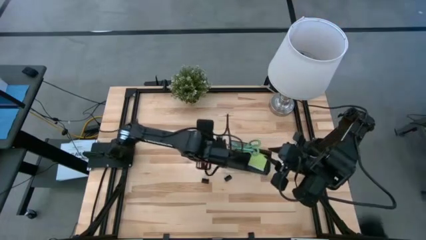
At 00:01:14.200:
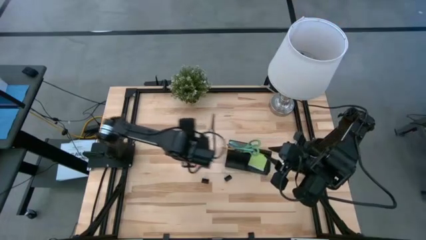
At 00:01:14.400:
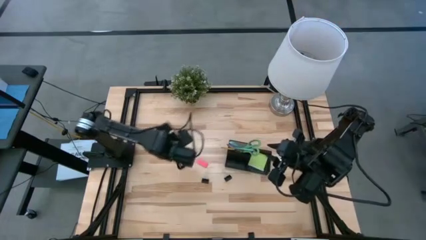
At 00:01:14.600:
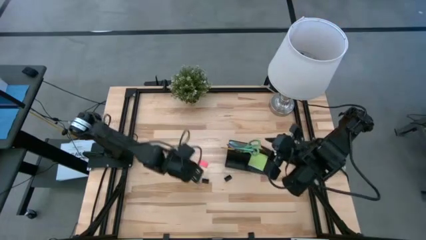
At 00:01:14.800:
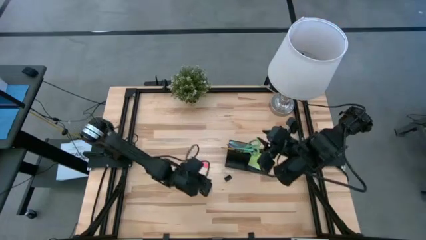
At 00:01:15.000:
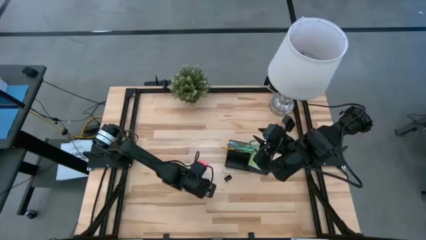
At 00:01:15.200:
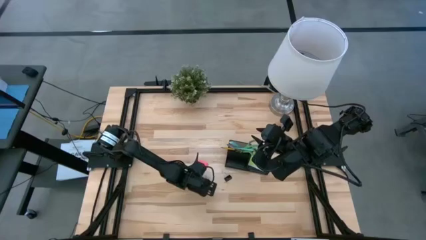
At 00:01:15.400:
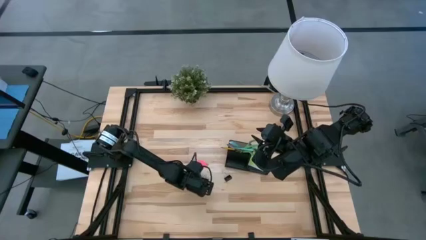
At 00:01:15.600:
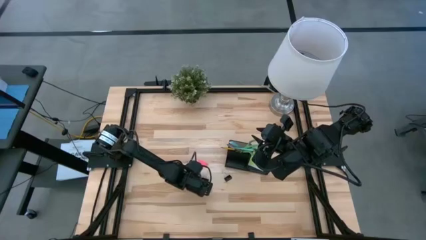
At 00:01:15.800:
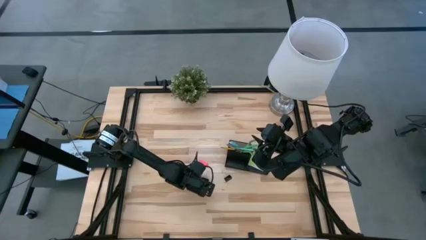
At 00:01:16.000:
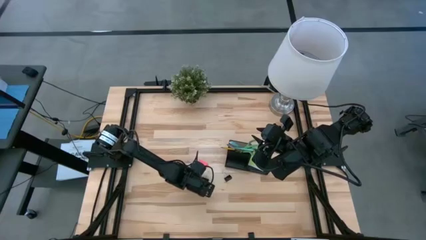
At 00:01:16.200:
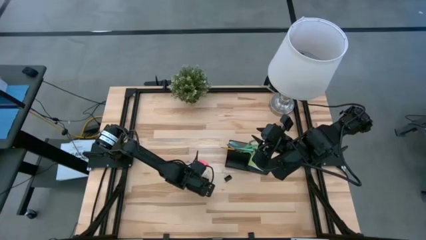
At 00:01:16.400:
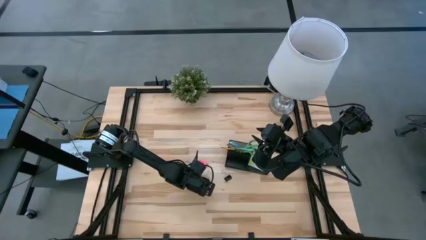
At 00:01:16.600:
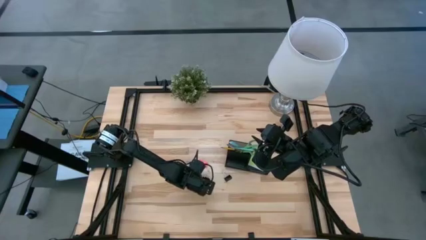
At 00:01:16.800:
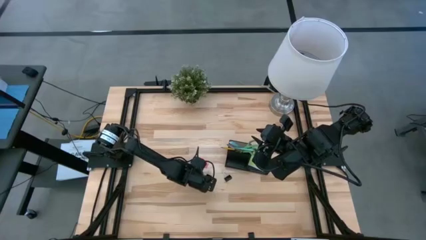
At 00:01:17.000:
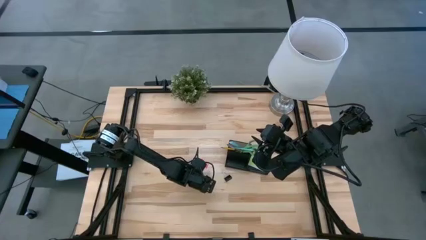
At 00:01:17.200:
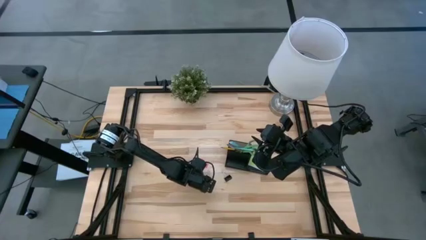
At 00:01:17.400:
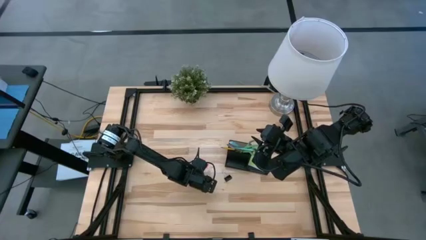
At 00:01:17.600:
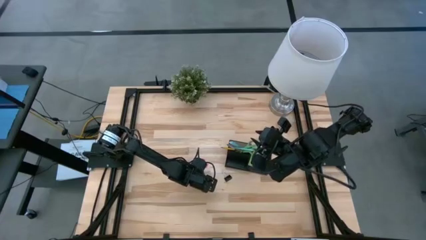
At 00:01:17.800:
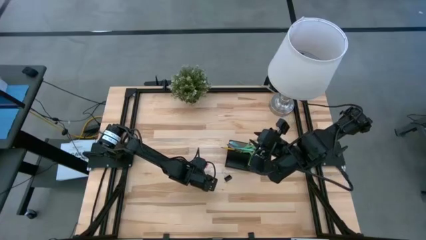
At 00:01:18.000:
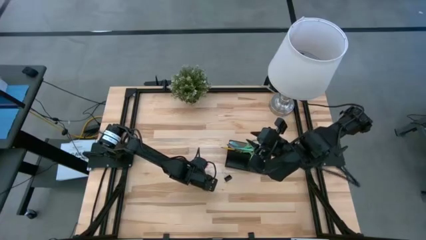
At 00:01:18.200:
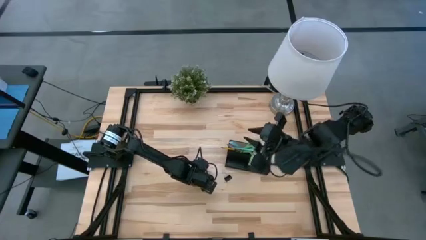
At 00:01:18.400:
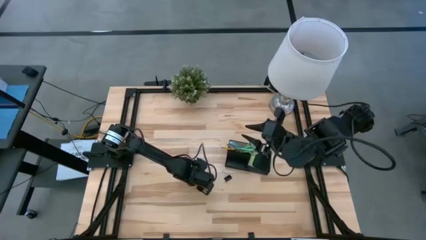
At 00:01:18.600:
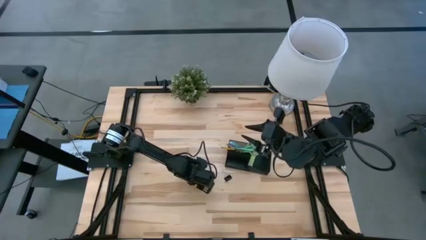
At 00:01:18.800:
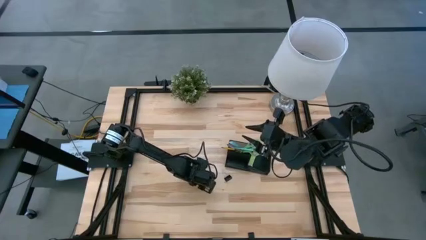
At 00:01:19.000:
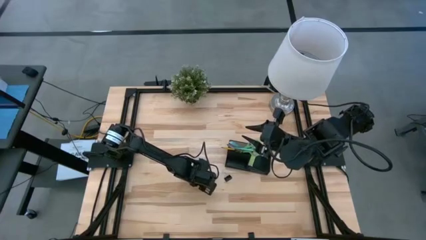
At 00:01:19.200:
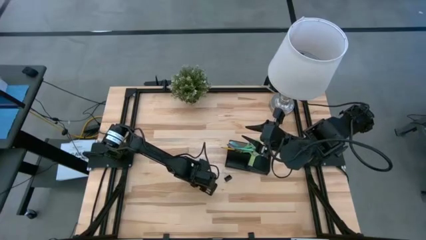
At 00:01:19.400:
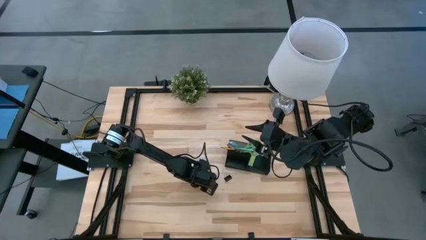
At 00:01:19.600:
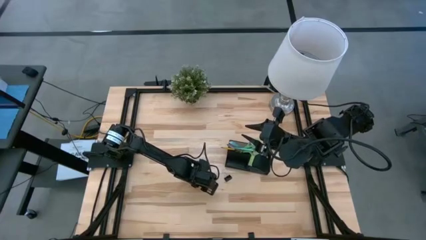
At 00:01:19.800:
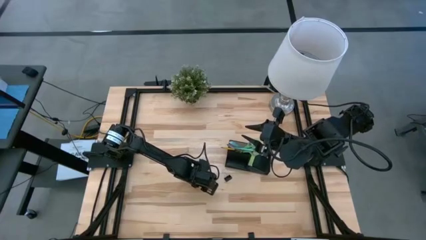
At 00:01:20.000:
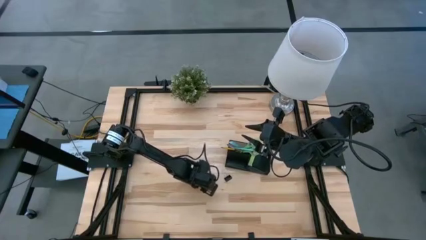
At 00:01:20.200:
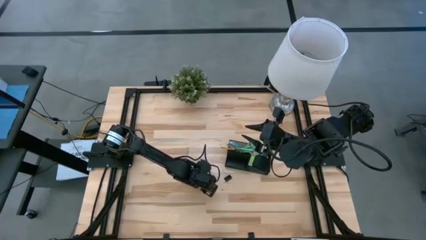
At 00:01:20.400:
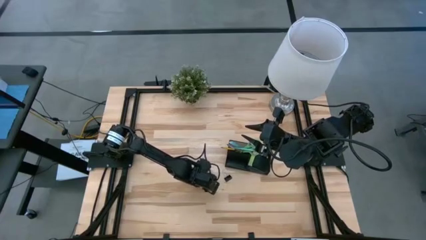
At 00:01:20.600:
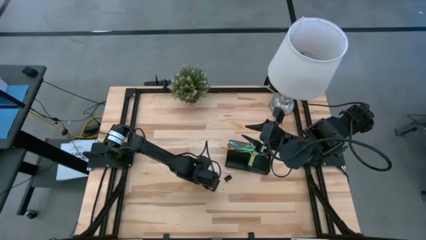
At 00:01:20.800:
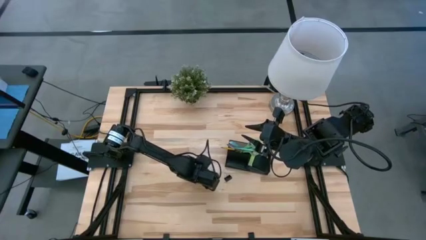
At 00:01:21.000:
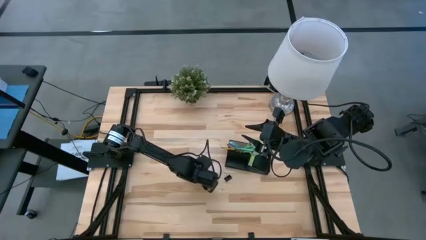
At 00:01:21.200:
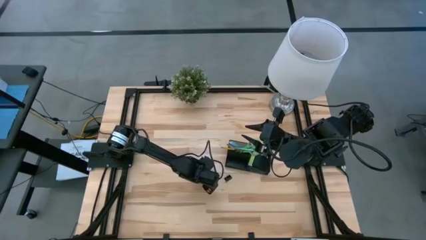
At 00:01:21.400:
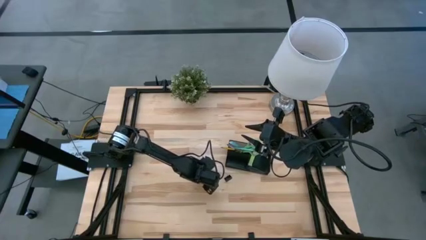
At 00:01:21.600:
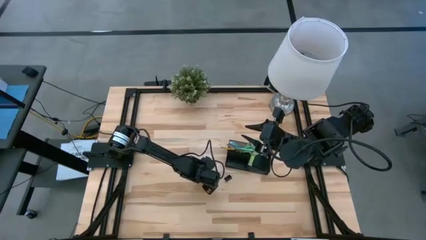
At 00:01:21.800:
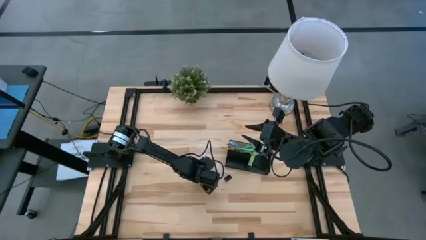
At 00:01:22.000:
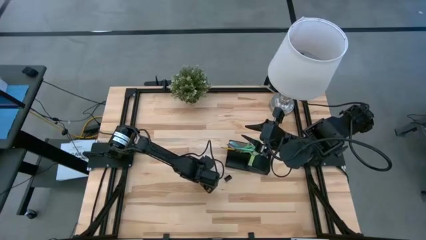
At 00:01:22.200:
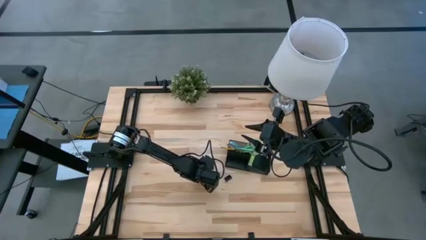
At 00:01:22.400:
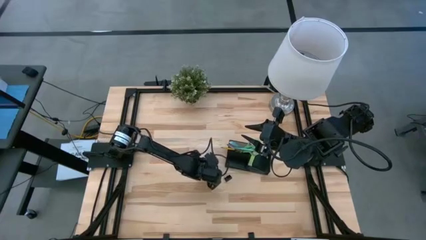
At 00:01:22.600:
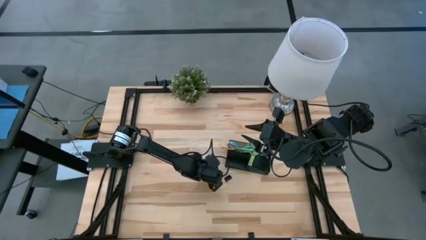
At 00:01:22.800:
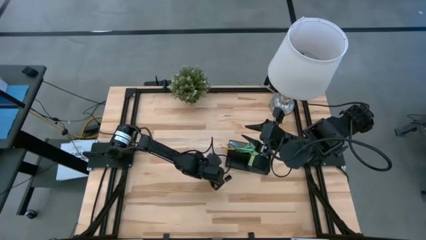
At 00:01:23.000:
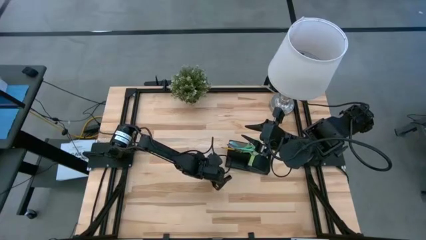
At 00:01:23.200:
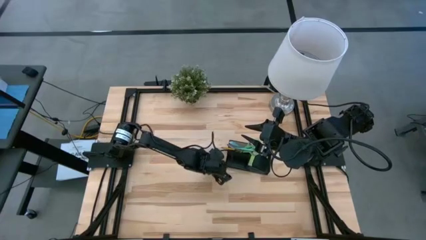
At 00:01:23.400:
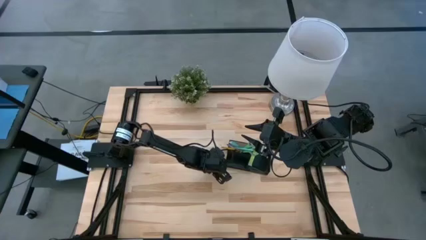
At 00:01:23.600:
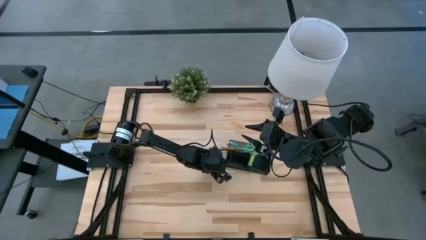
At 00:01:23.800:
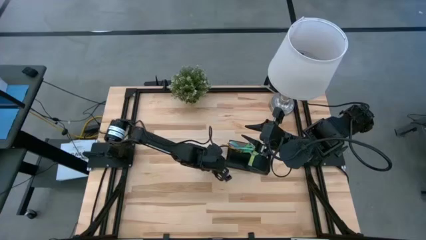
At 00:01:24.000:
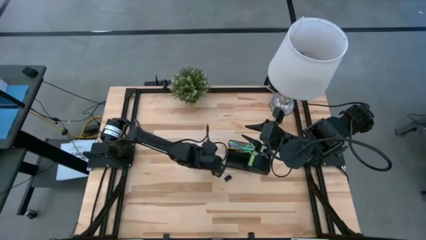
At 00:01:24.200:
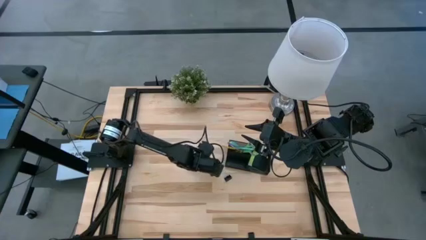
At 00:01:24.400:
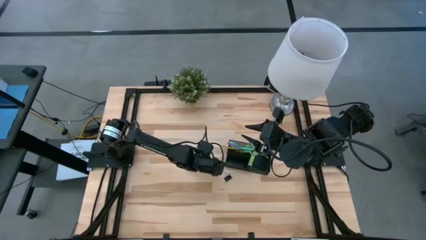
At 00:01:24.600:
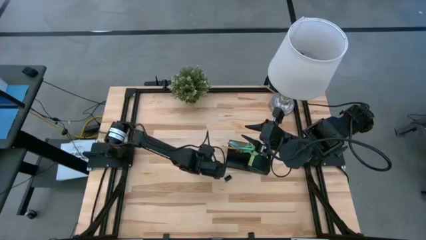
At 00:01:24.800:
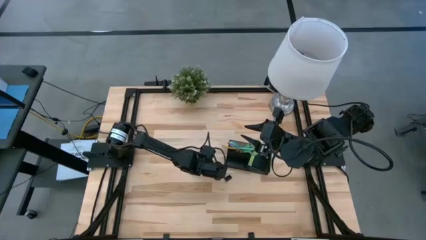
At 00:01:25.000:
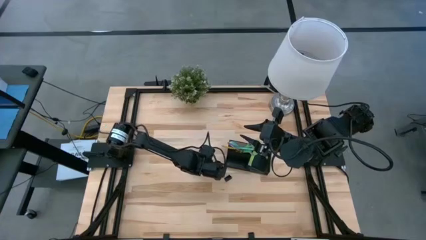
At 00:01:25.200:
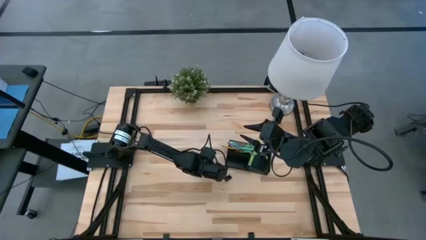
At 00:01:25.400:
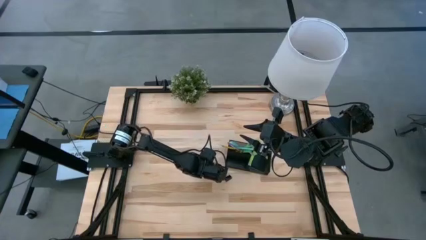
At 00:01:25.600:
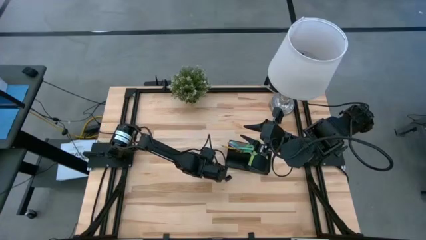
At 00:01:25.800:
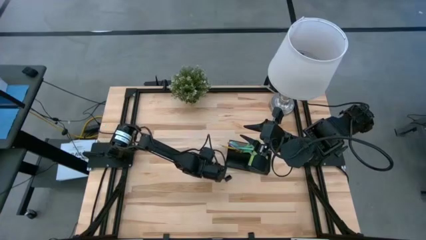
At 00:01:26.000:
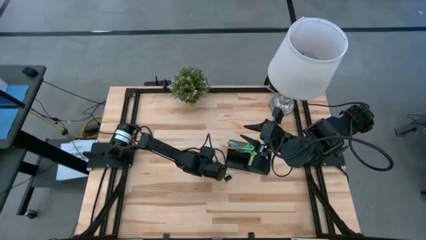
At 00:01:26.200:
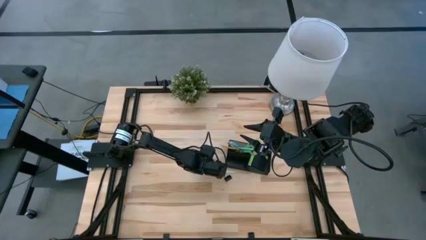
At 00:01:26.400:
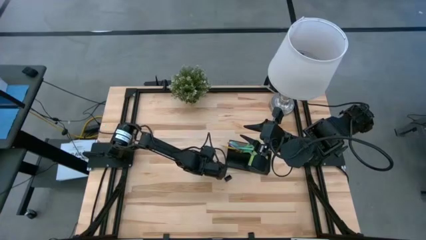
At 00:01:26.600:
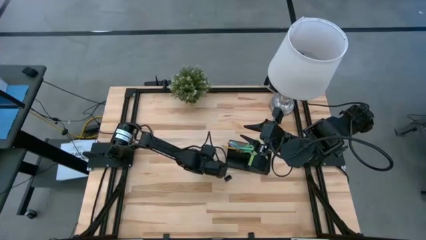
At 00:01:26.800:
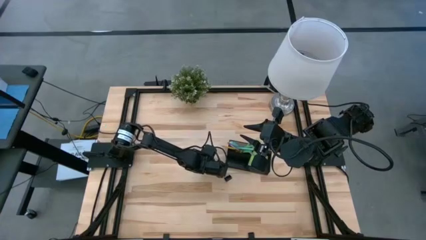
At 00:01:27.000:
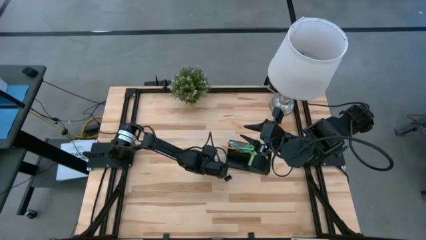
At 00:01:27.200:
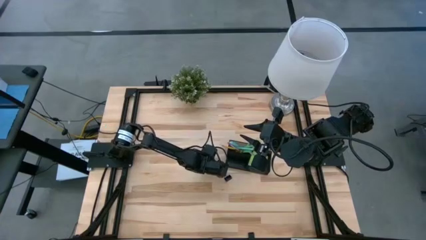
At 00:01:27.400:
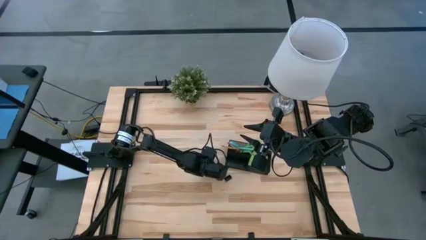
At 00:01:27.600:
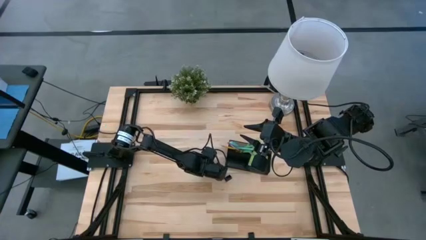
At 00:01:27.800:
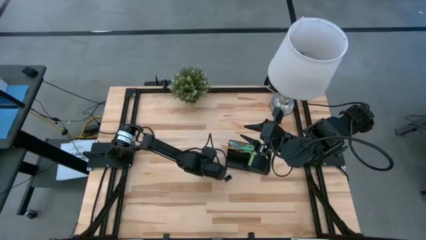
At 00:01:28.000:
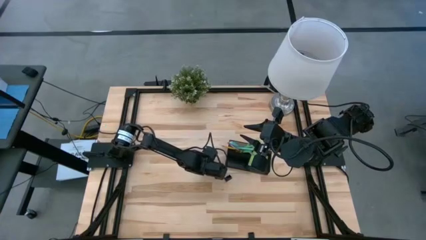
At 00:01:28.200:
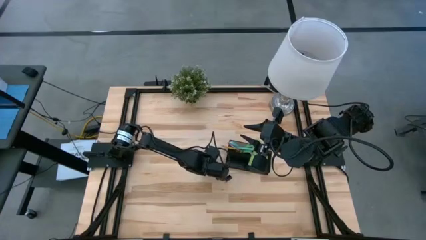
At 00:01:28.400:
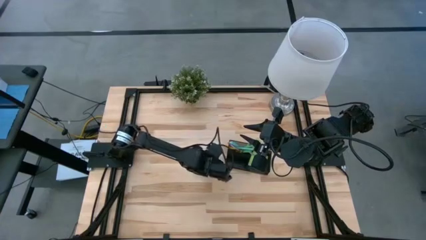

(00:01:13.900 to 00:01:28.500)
Task: Pick and place office supplies into organizer
Put the left black binder clip on the black desk organizer
